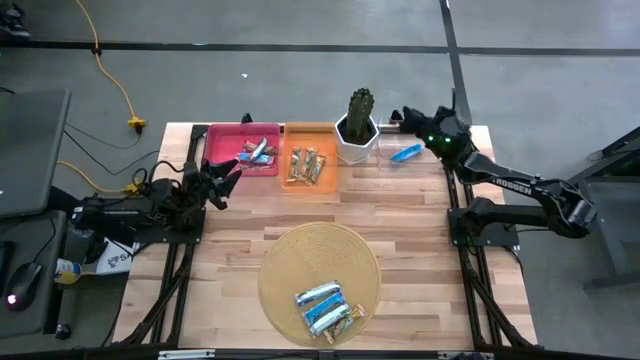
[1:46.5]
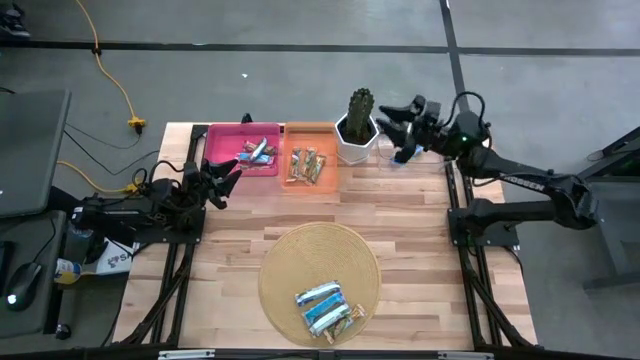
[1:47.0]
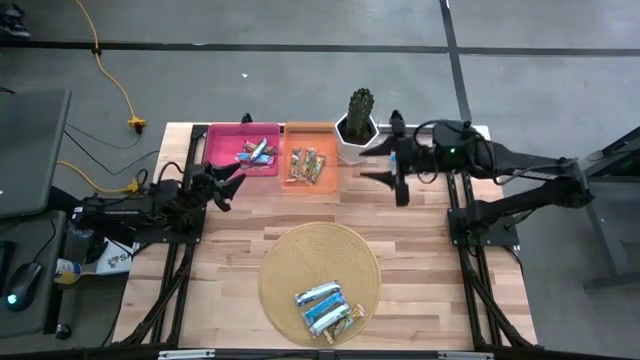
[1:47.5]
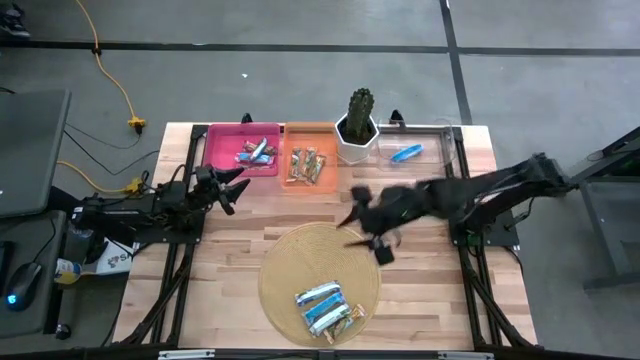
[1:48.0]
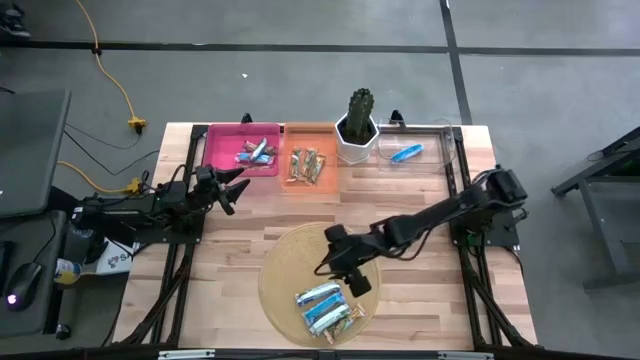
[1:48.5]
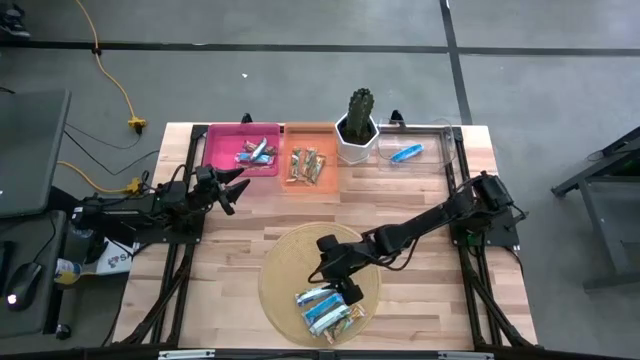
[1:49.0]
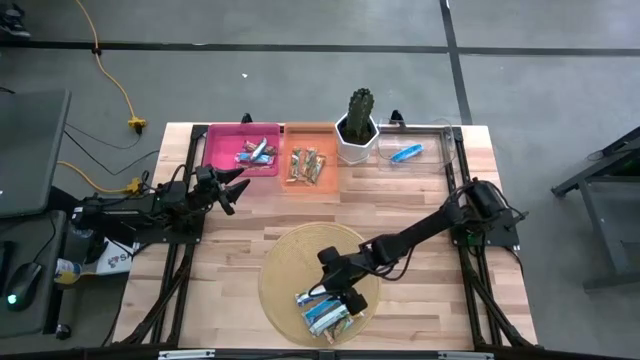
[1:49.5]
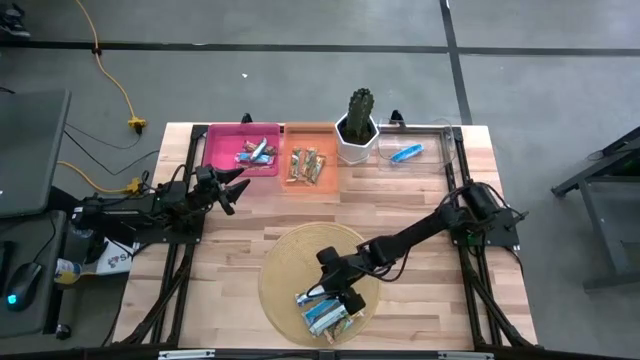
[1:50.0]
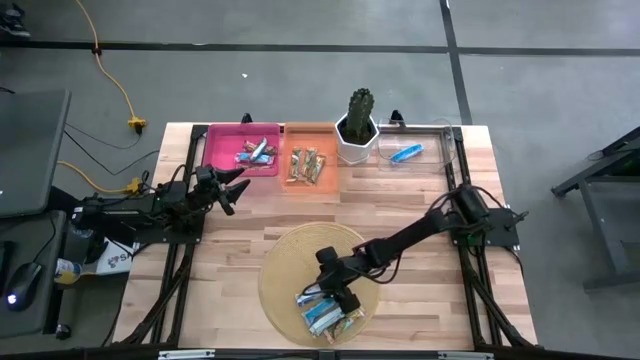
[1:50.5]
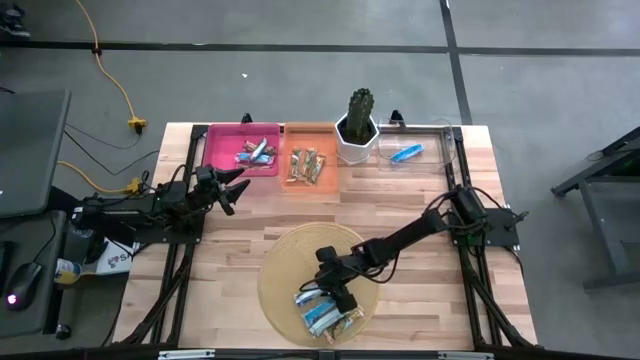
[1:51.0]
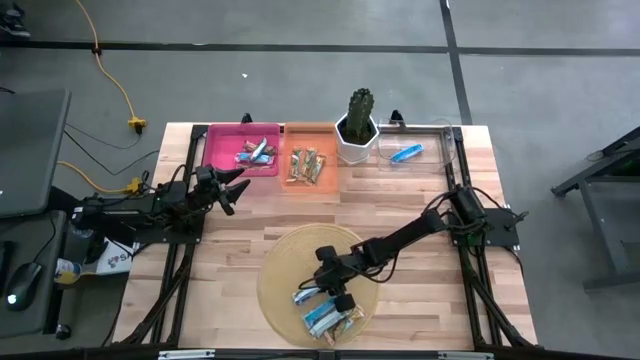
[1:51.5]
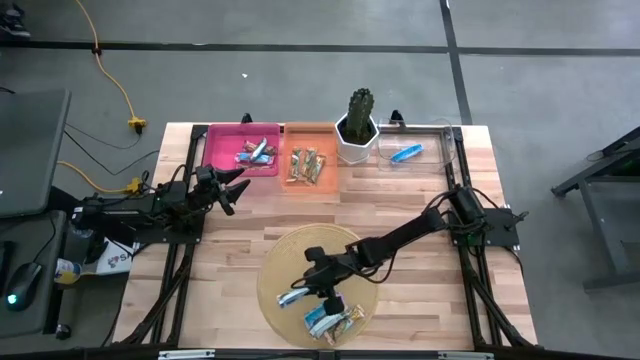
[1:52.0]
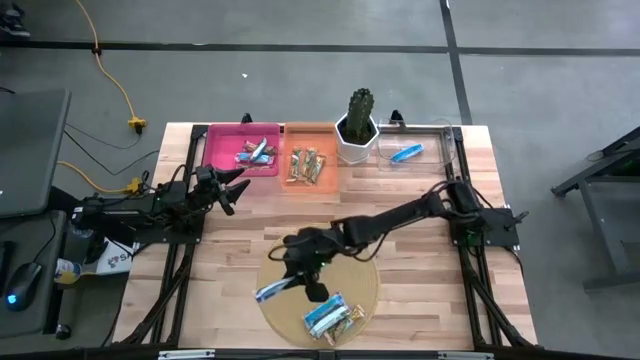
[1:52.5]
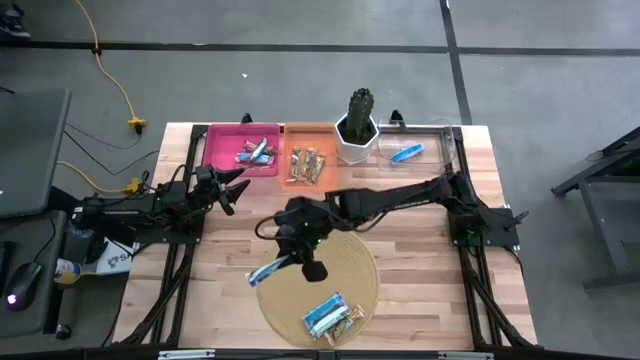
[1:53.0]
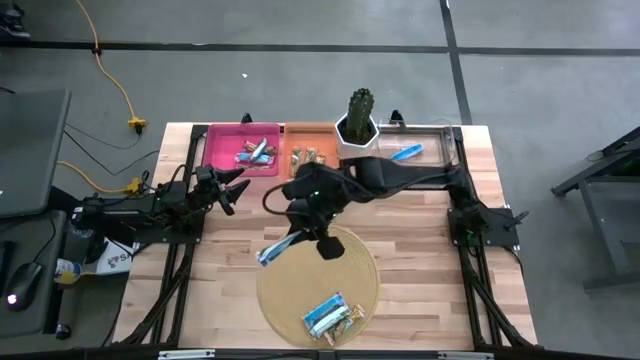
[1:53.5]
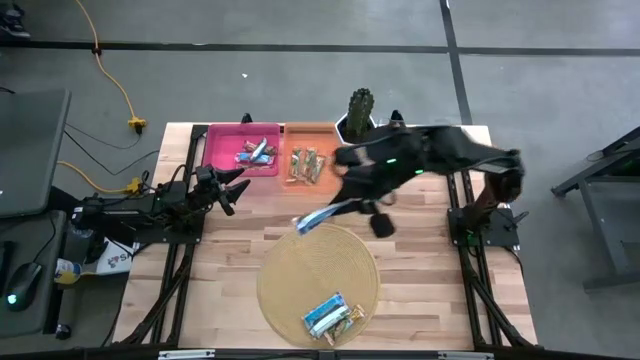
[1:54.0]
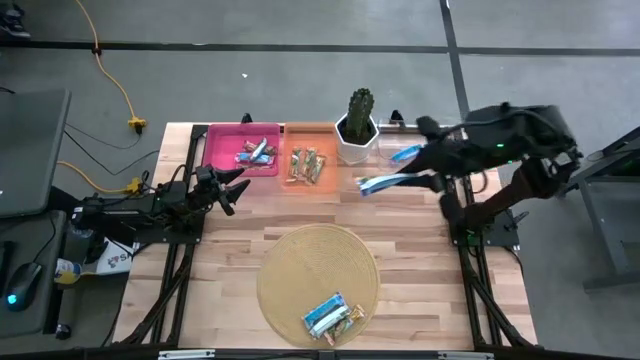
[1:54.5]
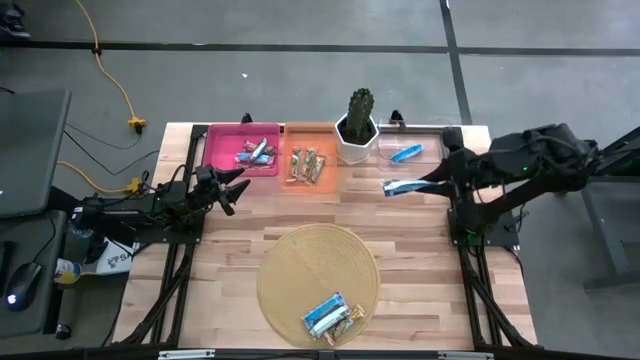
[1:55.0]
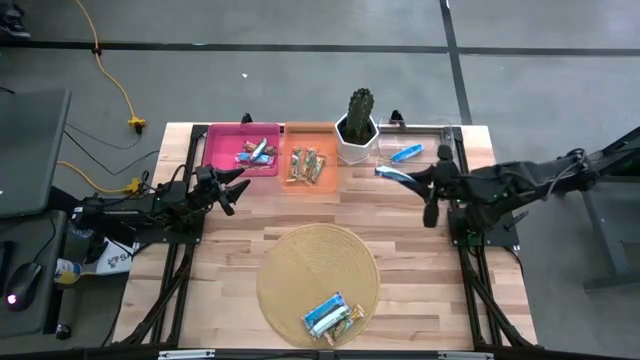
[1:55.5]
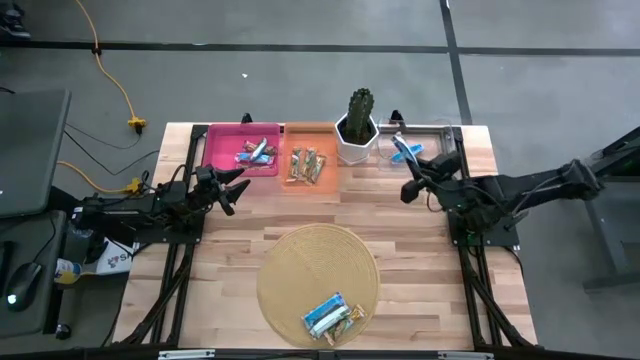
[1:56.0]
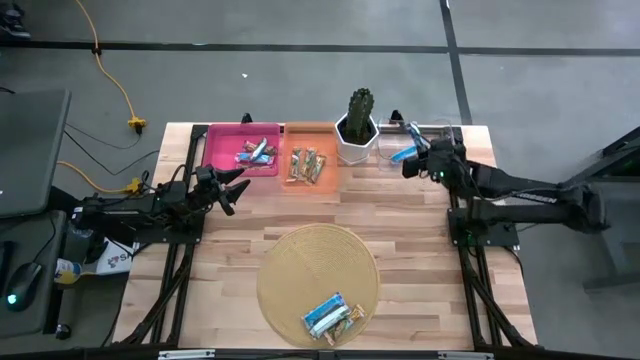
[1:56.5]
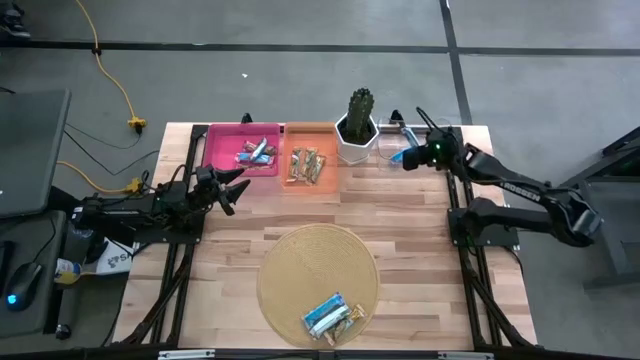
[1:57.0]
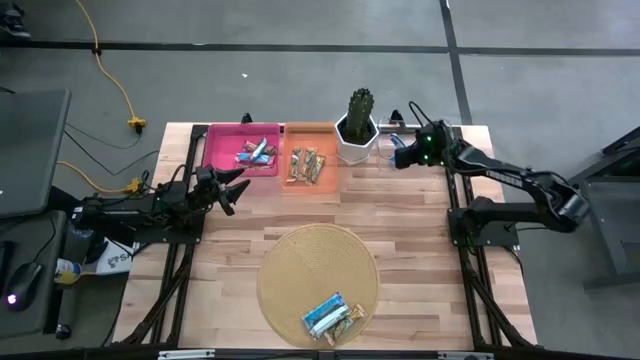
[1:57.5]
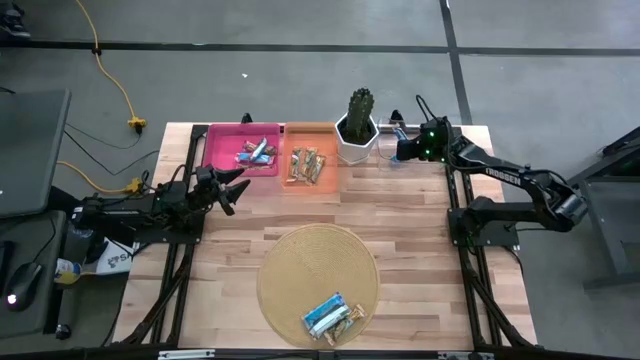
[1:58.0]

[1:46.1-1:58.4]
Task: Pick and place Granola Bars by type
Put the blue granola bar into the transparent bin

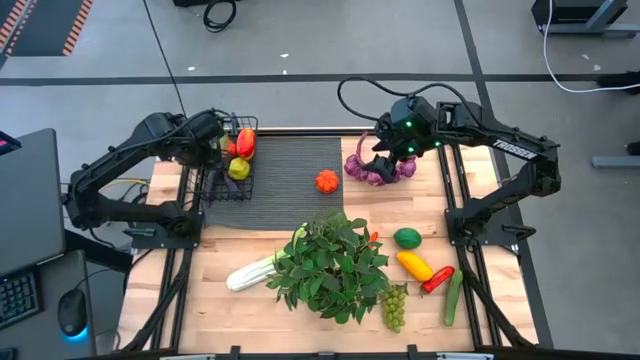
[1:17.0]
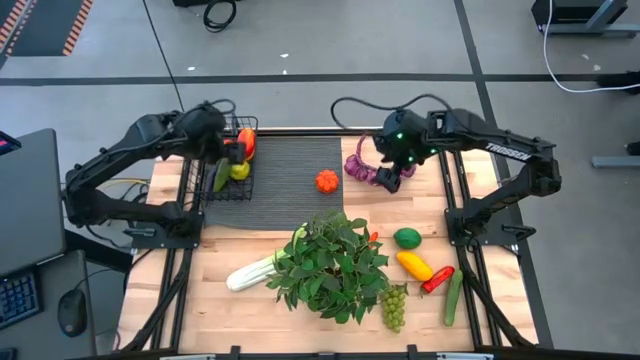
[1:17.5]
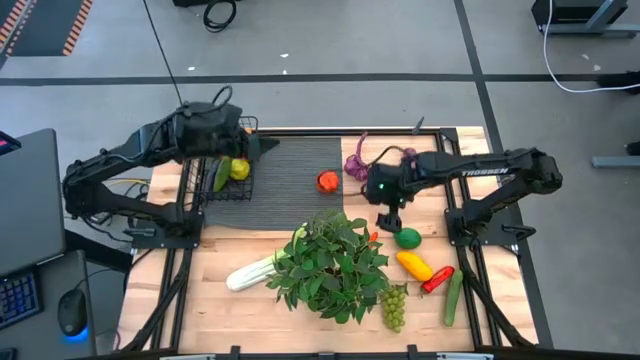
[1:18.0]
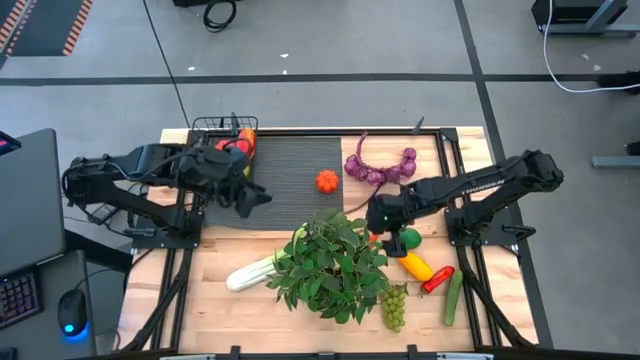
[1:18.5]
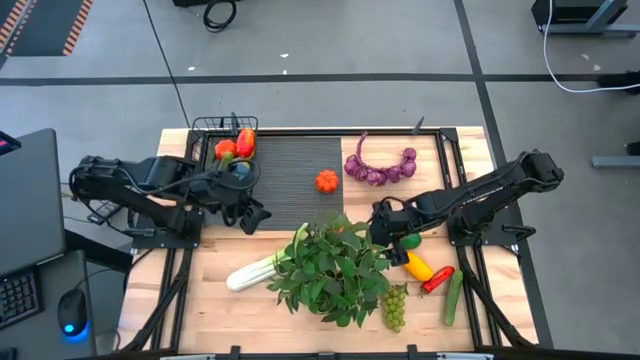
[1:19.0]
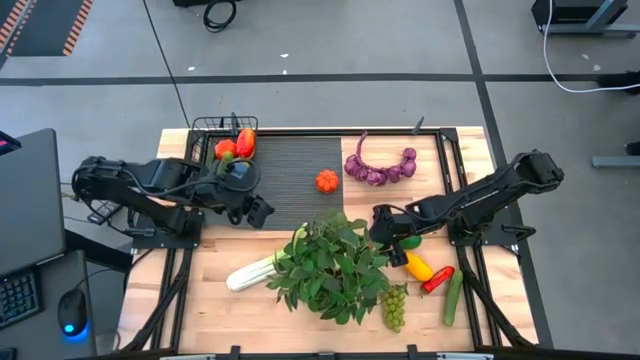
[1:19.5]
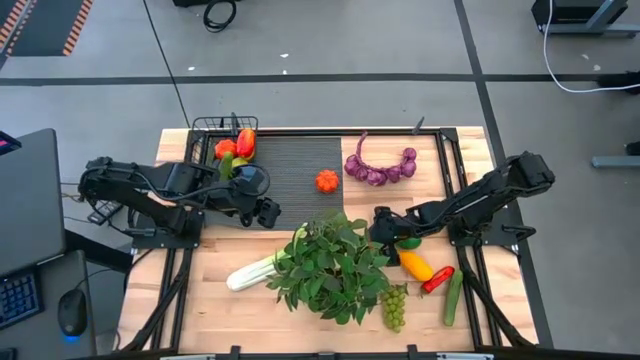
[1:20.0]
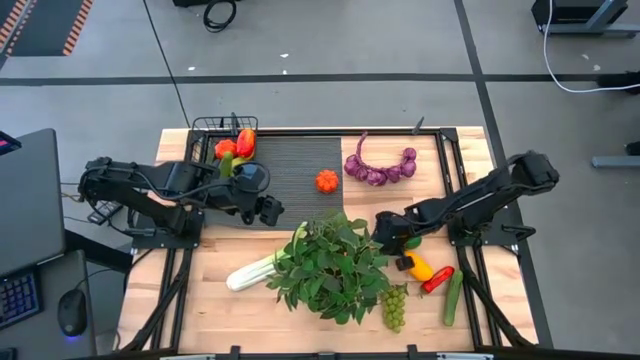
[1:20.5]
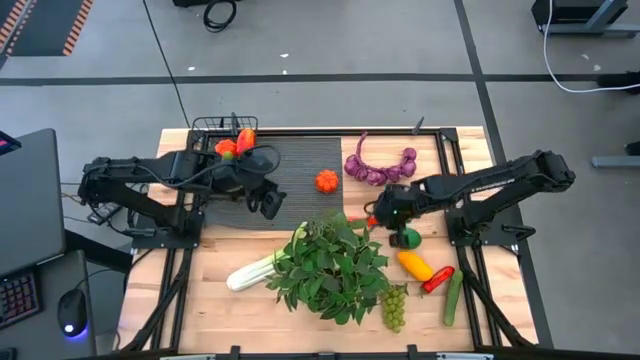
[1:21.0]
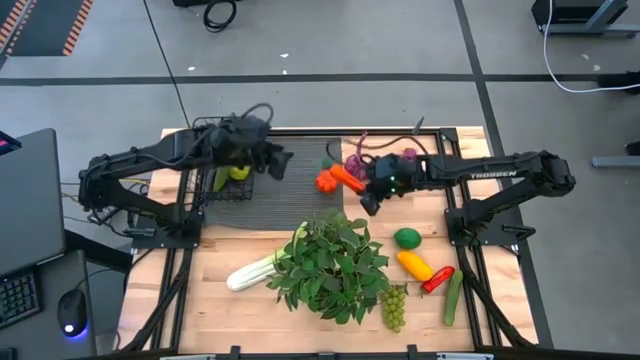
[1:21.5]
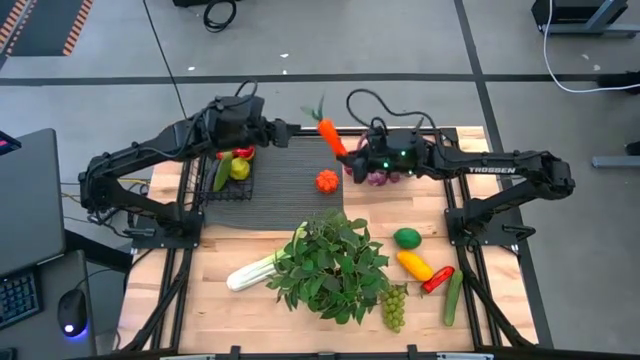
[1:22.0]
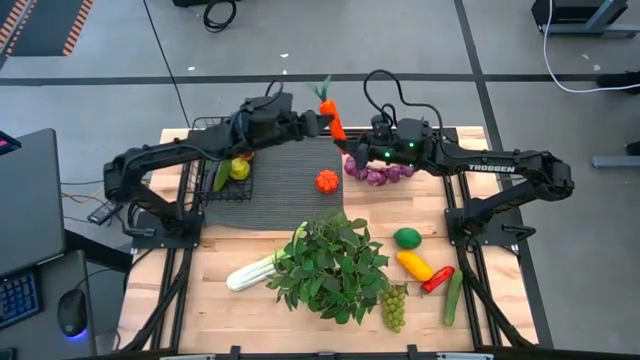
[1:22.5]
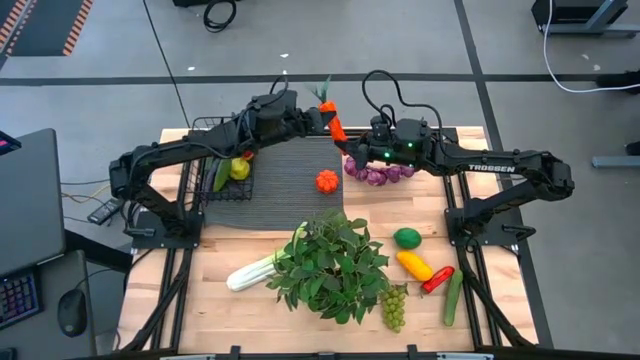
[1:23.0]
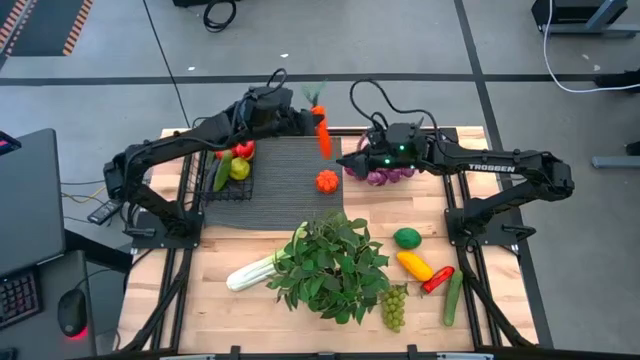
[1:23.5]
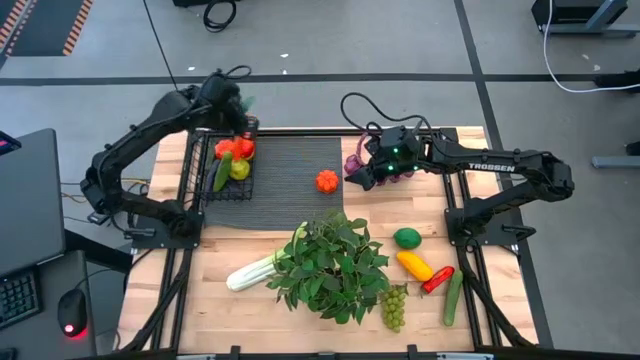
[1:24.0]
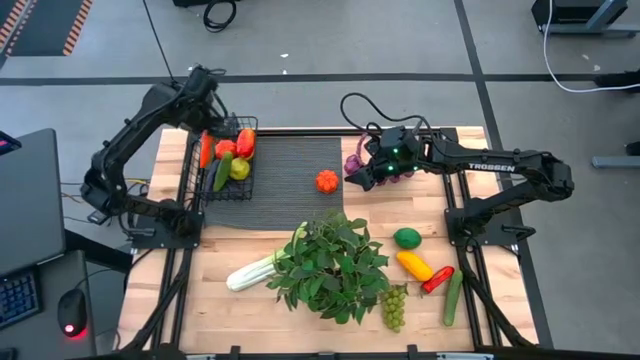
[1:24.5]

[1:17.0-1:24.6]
Task: Build produce basket
Put the orange carrot into the wire basket
